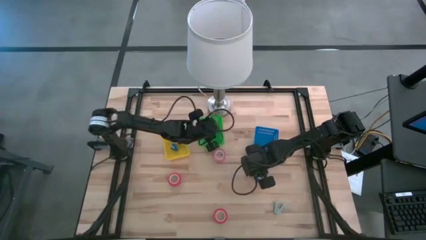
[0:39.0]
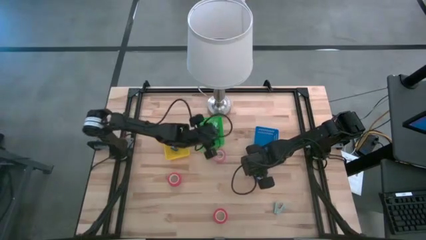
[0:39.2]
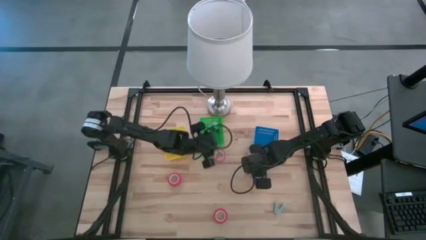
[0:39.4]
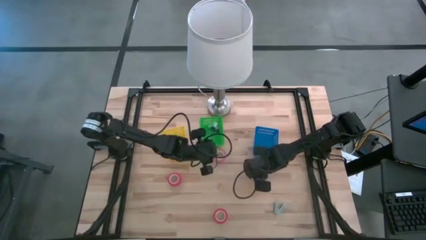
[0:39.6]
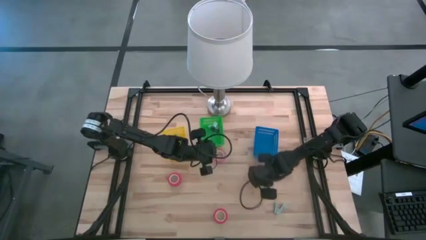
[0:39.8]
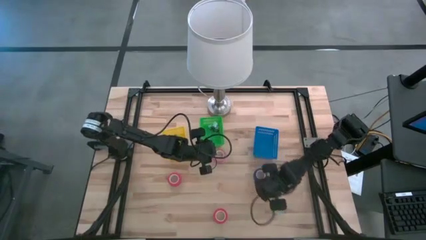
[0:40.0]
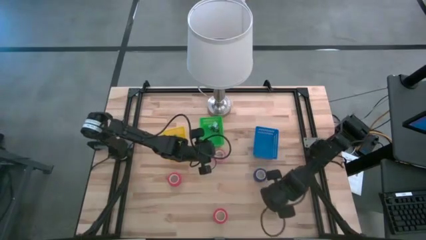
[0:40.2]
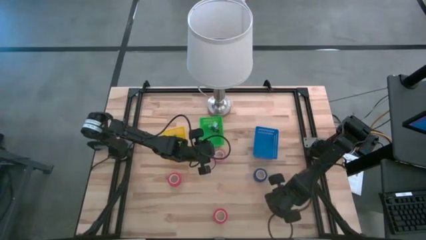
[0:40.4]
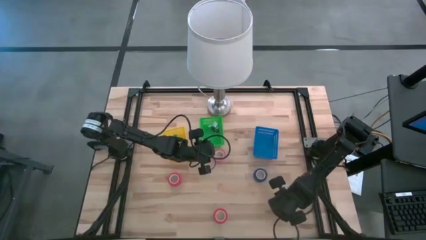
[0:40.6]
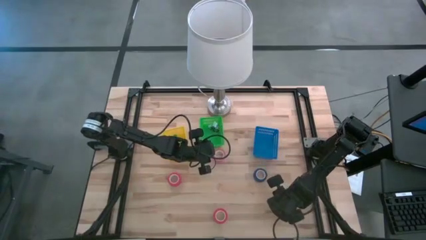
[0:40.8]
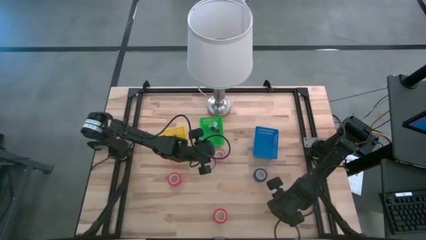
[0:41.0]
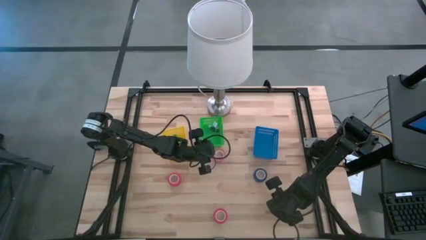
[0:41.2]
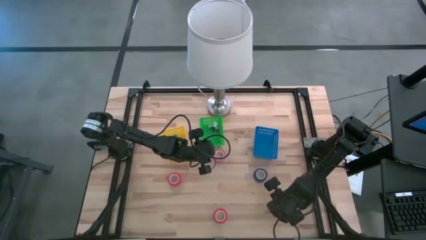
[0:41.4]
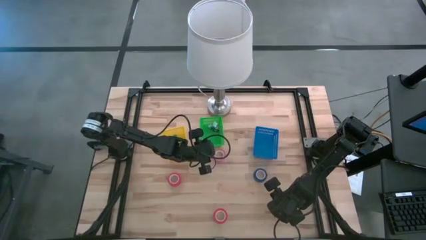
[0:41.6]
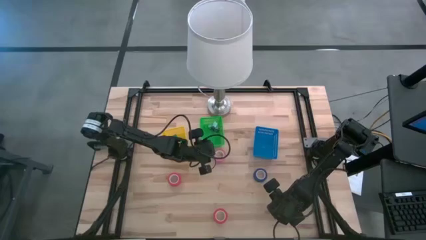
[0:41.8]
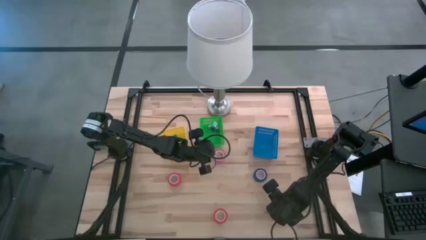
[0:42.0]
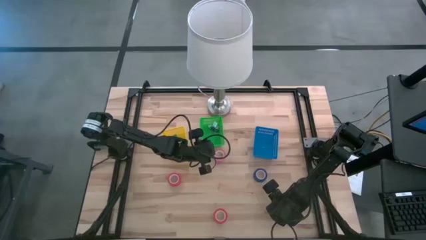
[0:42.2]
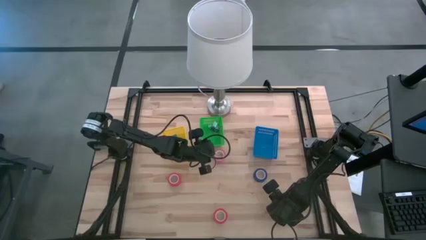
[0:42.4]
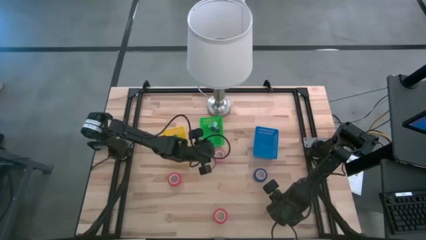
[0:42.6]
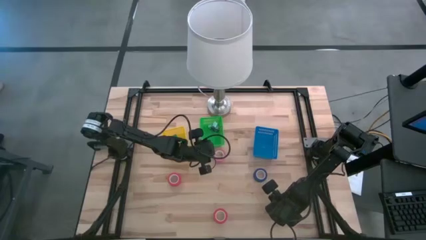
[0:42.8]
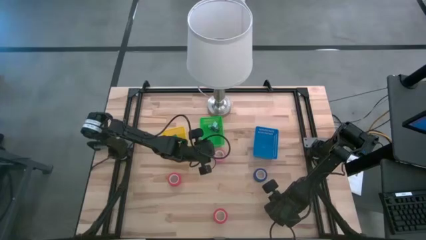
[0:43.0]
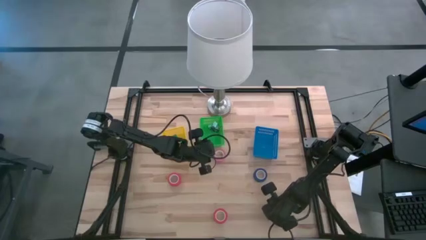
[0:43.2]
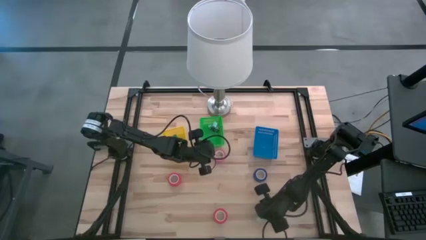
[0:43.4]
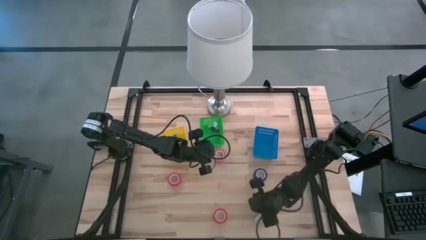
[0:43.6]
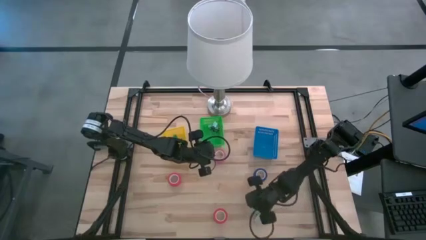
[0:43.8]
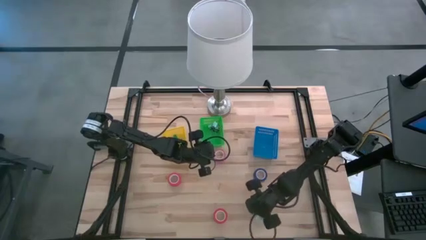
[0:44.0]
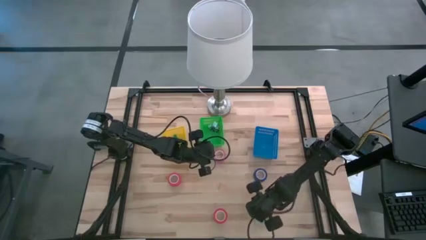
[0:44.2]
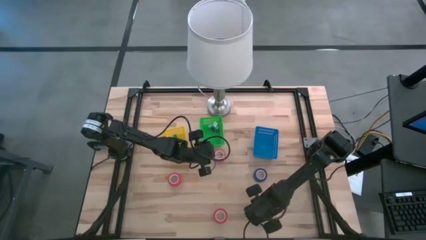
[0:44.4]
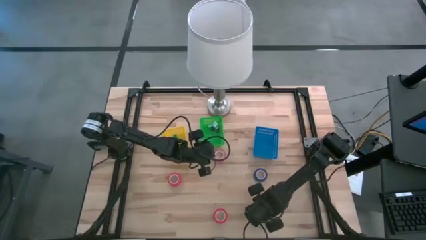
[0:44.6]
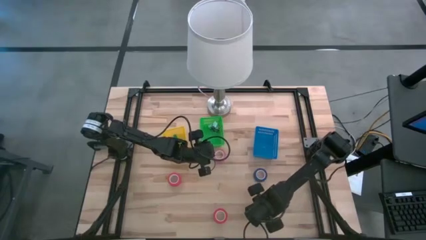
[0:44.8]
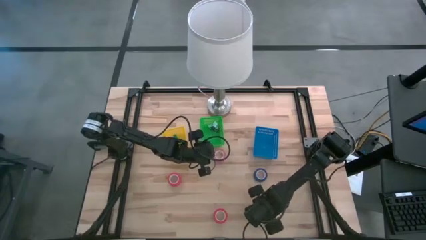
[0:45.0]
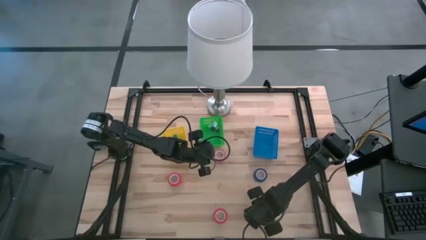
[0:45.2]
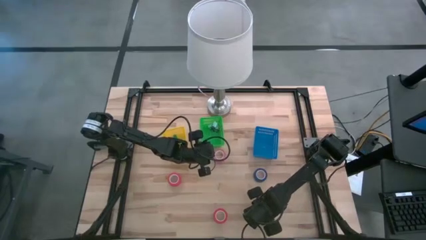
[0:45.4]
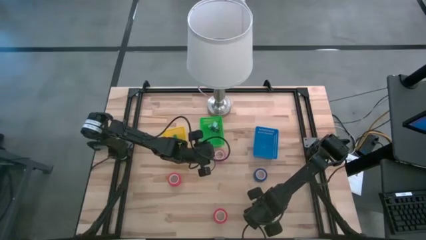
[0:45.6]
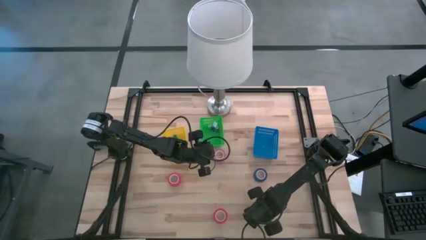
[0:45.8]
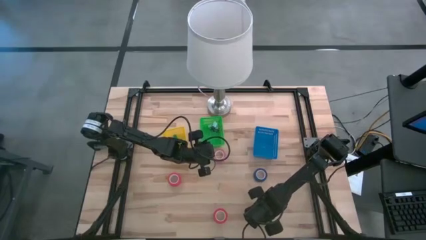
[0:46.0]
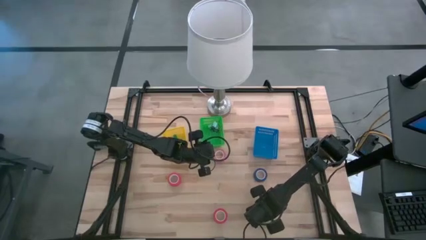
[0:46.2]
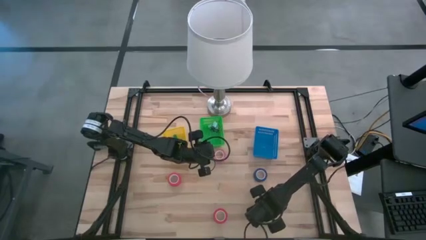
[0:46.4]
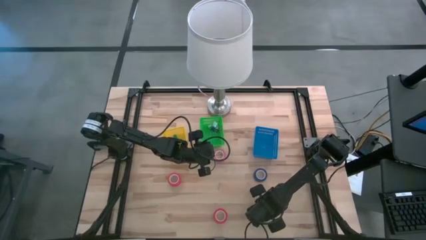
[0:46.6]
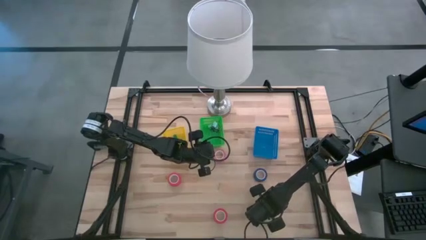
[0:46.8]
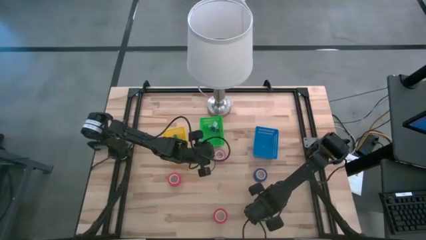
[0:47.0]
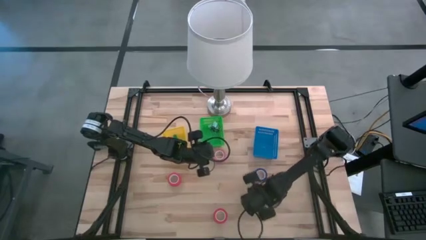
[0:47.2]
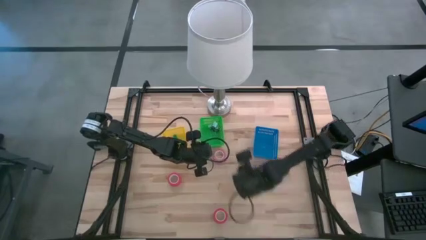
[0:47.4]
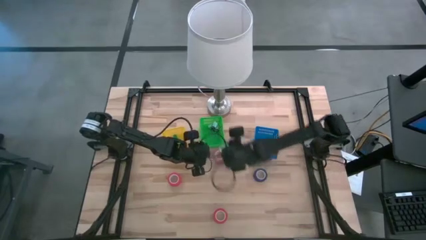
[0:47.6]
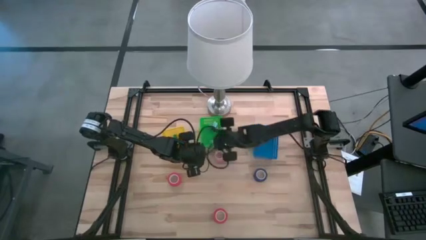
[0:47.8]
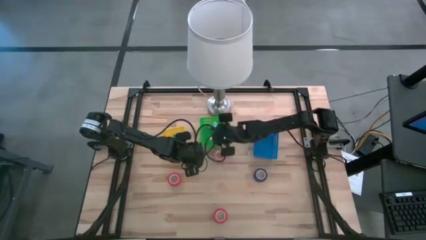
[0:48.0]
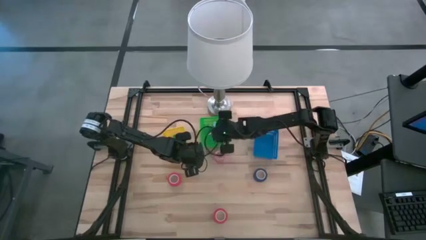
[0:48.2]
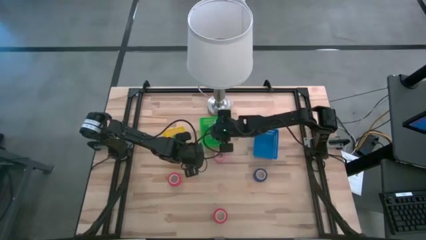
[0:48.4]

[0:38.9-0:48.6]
Task: Pick and place Stapler, Stapler remover, tape
Put the blue staple remover into the green bin

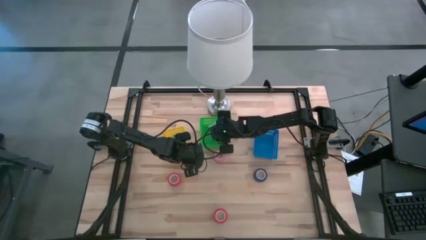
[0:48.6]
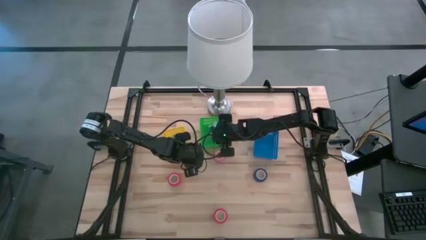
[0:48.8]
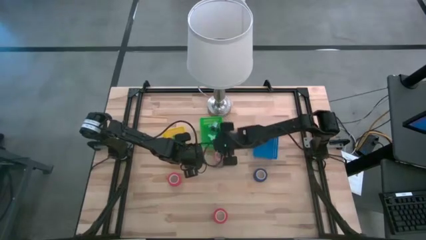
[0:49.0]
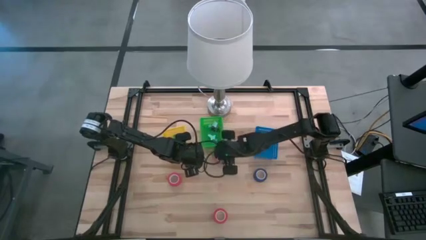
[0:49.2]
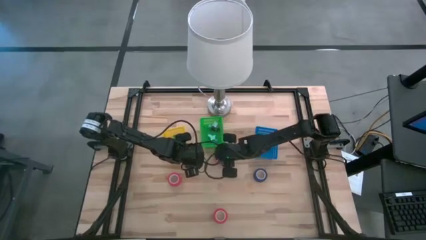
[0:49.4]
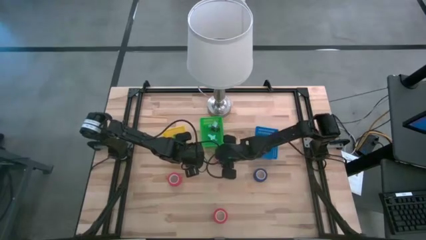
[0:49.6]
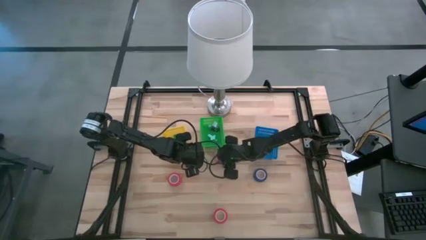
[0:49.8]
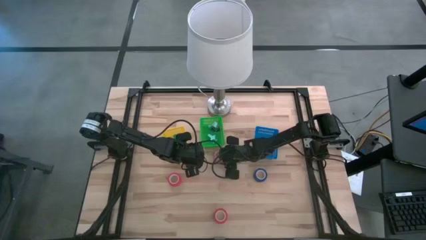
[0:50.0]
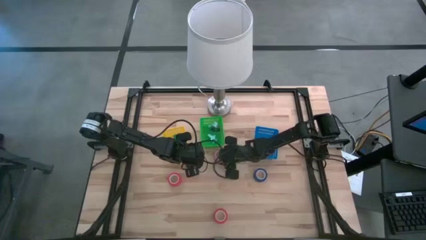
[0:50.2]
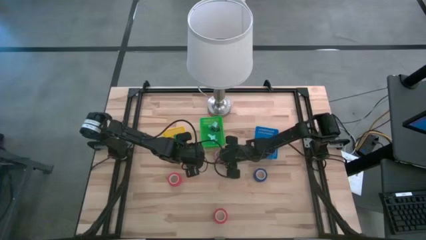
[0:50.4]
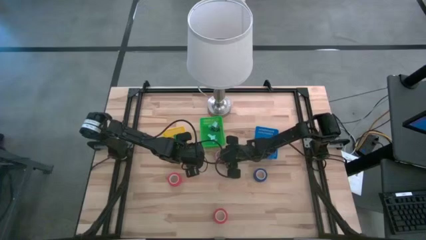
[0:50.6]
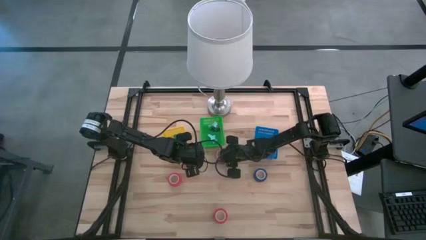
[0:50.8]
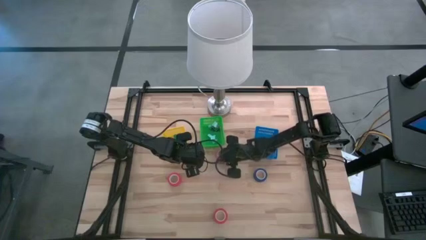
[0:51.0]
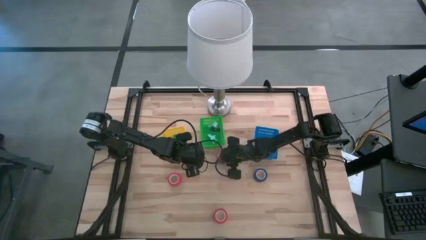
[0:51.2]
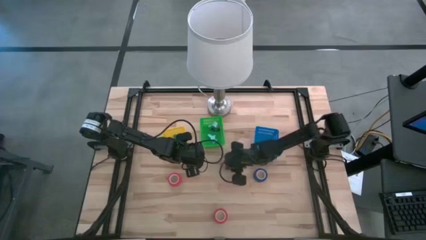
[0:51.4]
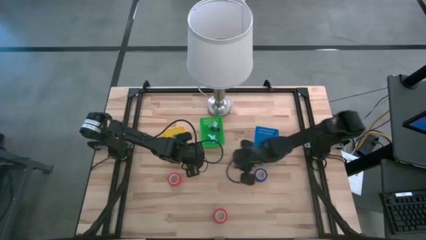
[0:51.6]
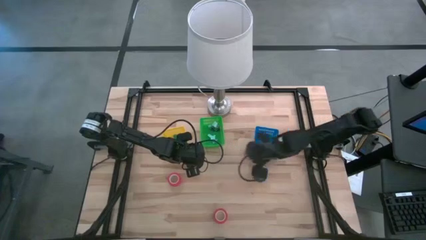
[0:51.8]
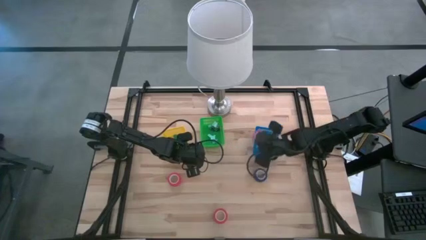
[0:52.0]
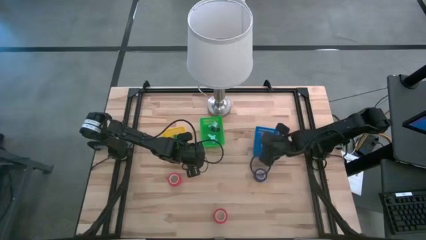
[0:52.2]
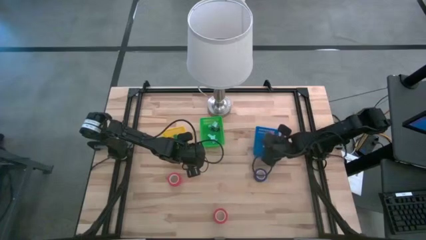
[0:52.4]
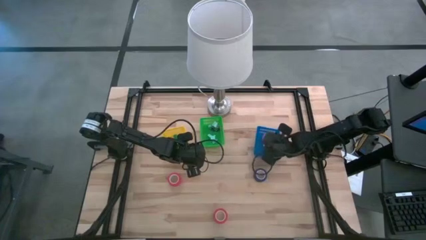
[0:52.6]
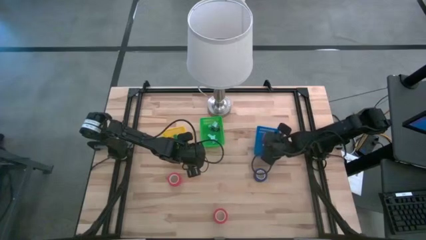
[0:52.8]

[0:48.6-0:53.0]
Put the pink tape into the blue bin

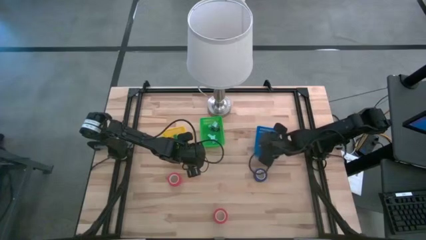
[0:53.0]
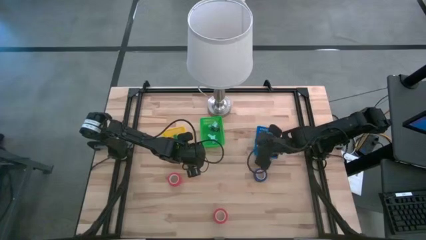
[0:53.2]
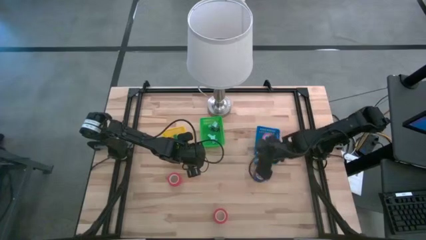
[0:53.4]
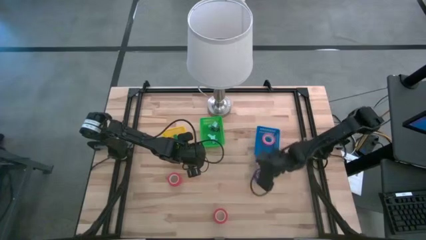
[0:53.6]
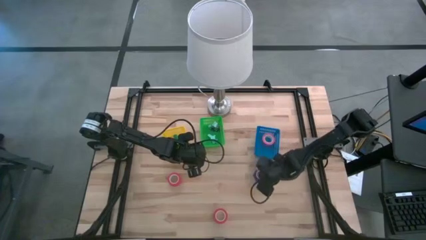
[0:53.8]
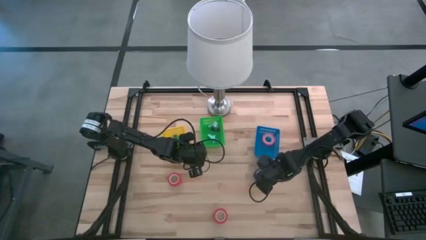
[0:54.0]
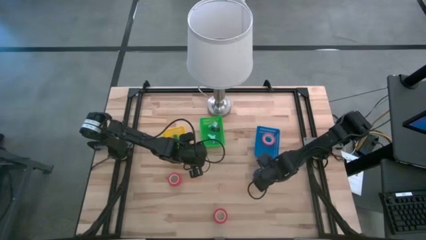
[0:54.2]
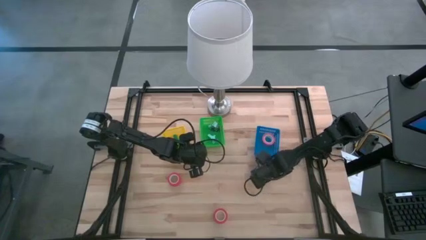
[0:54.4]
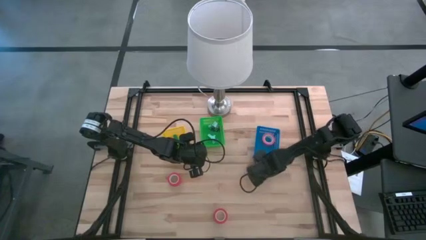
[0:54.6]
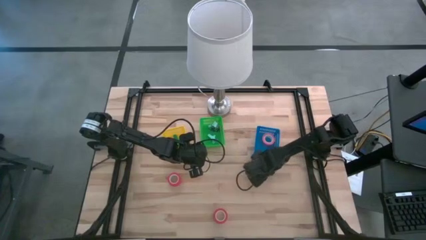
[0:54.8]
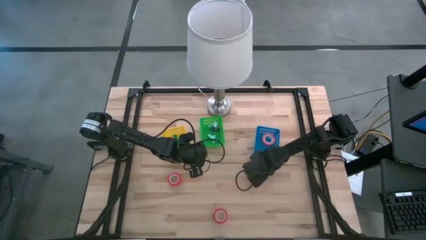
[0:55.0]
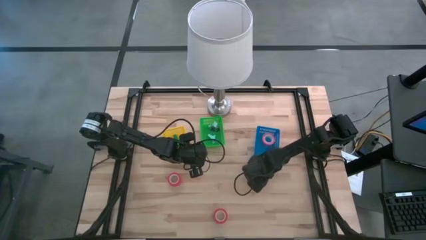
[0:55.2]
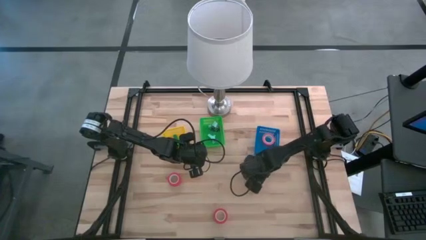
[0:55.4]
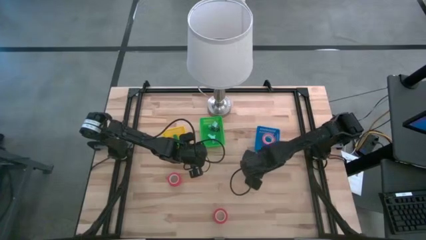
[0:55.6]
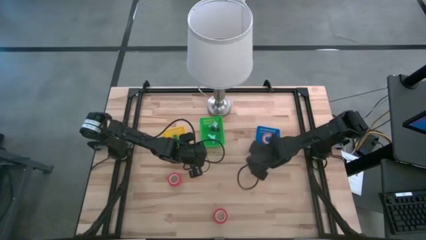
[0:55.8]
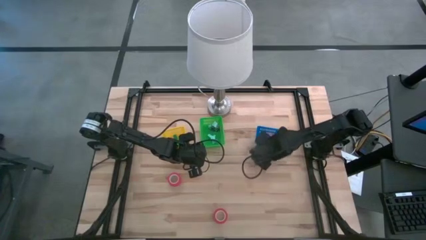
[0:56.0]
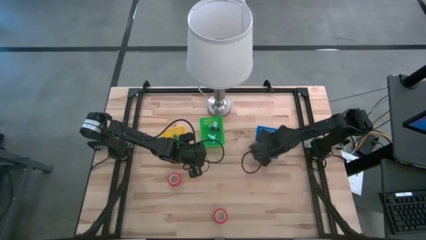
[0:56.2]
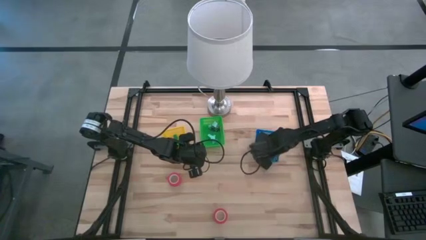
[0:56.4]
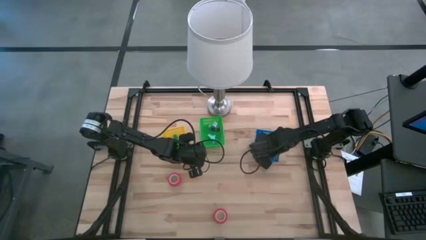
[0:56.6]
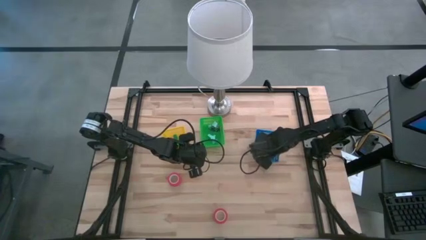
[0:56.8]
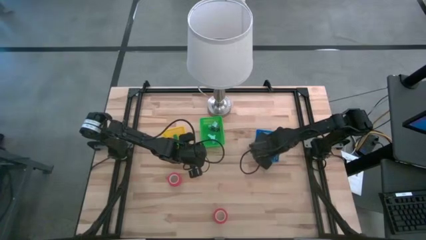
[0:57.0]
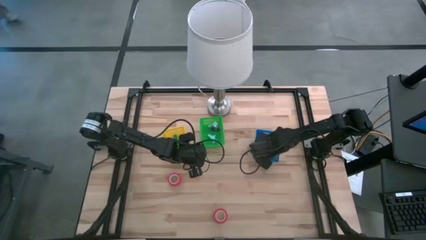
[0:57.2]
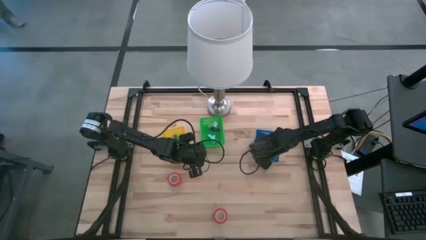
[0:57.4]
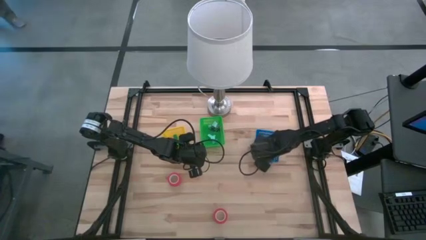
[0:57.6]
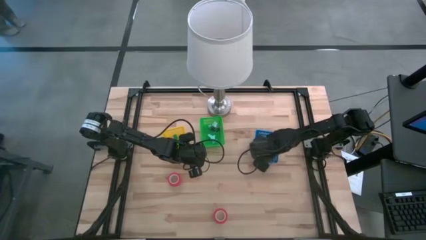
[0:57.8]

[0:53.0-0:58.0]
Put the blue tape into the blue bin
